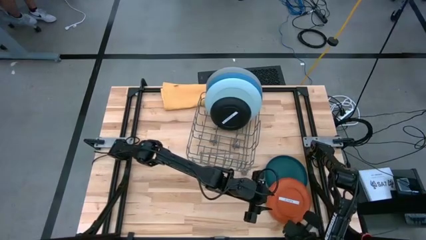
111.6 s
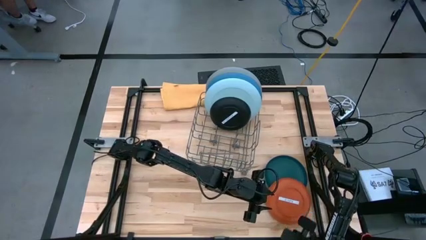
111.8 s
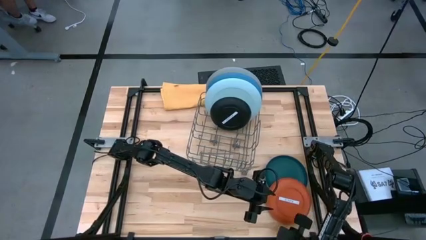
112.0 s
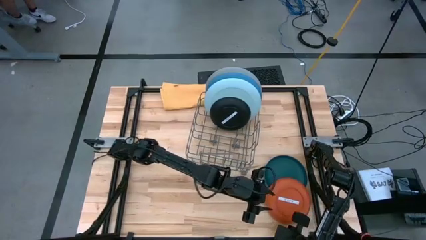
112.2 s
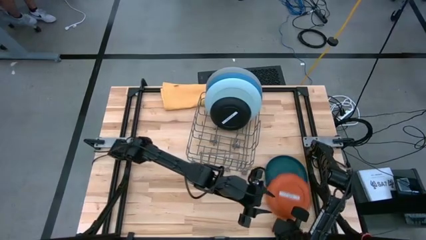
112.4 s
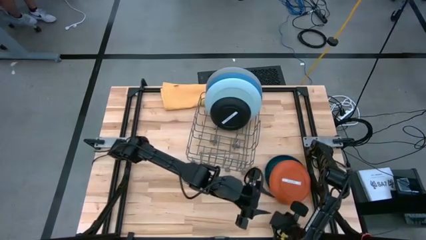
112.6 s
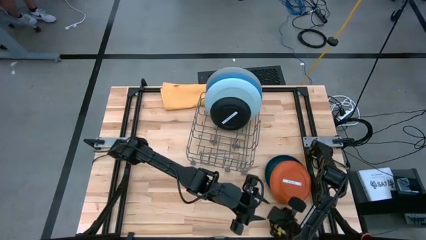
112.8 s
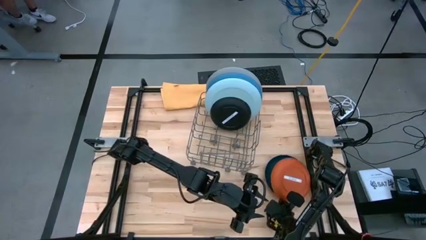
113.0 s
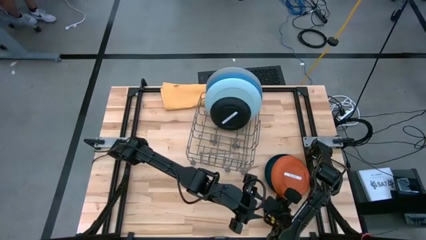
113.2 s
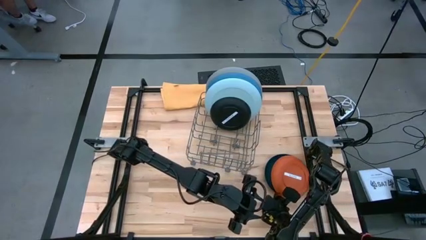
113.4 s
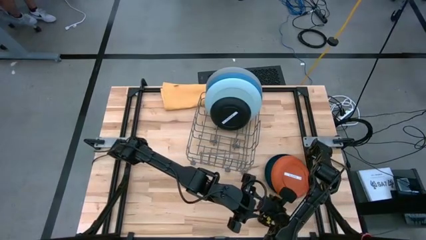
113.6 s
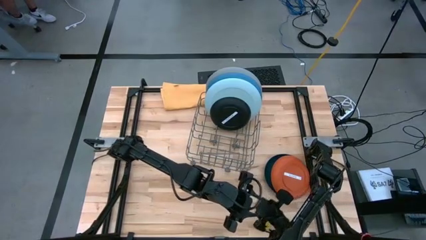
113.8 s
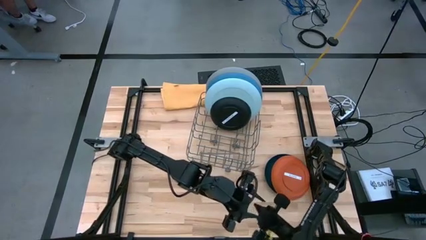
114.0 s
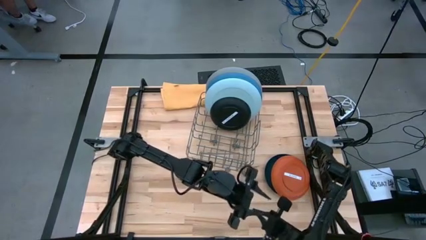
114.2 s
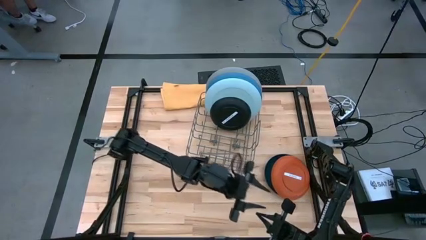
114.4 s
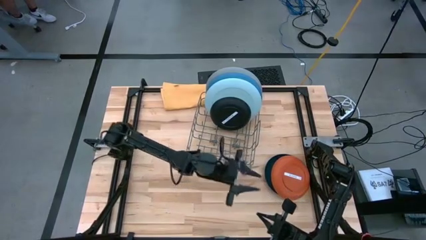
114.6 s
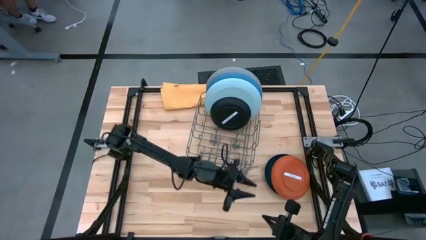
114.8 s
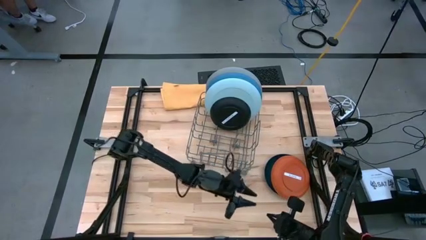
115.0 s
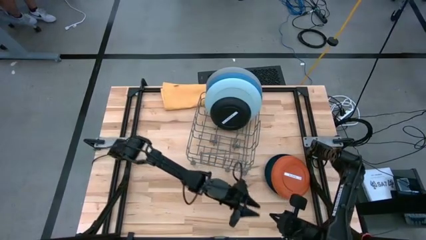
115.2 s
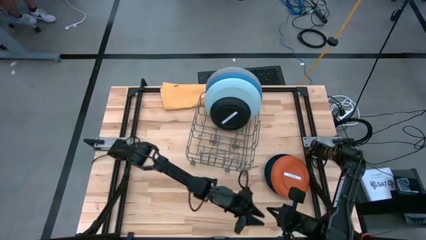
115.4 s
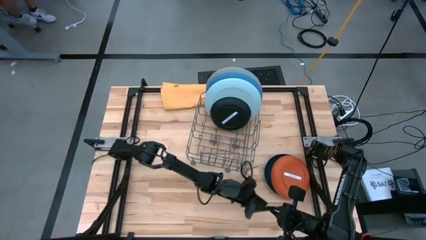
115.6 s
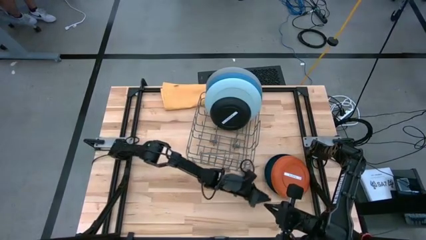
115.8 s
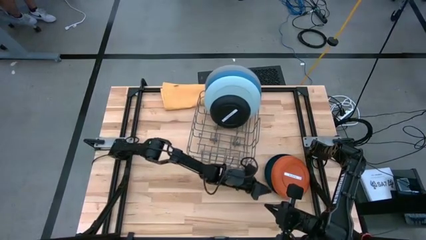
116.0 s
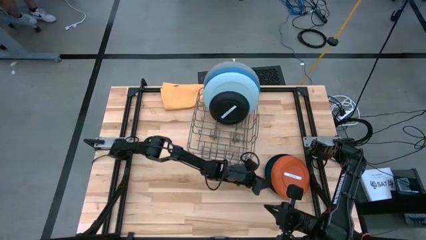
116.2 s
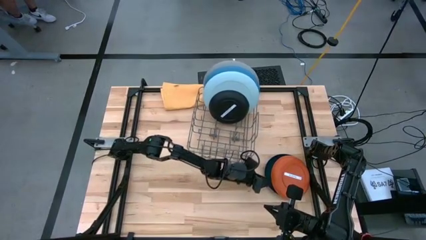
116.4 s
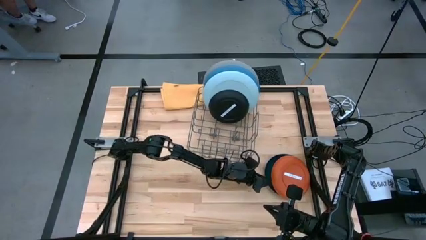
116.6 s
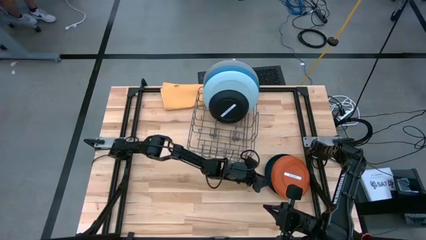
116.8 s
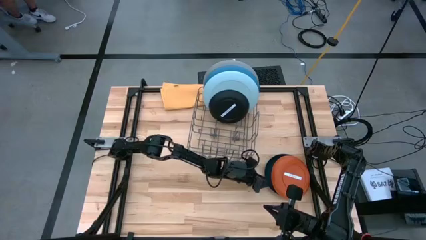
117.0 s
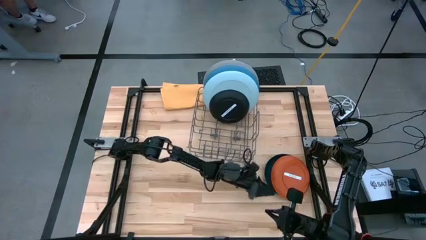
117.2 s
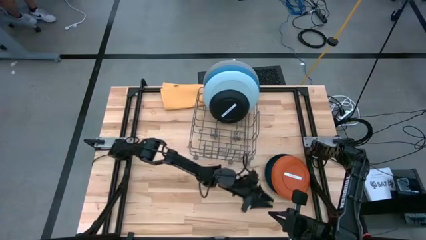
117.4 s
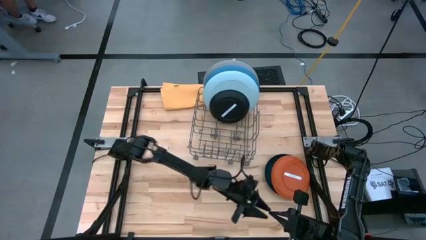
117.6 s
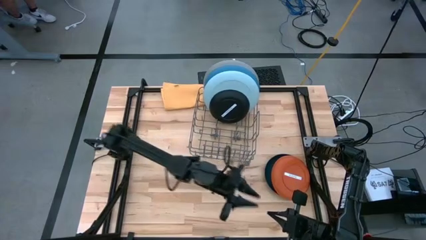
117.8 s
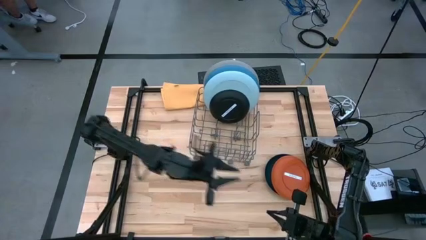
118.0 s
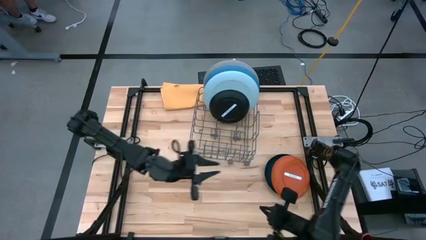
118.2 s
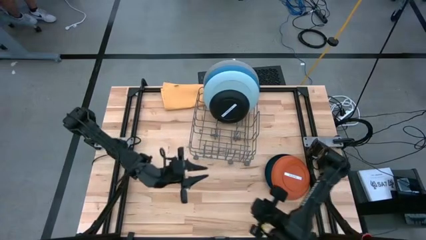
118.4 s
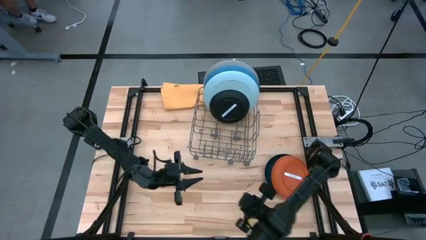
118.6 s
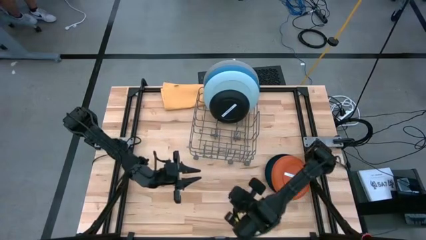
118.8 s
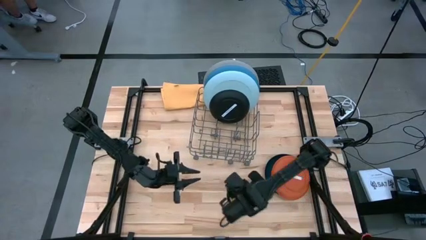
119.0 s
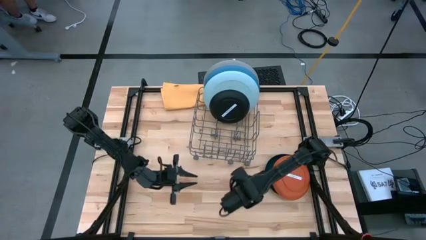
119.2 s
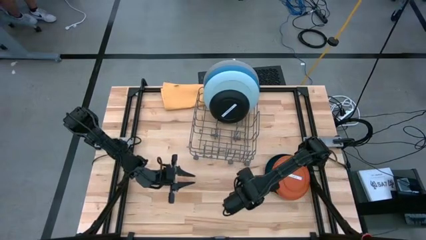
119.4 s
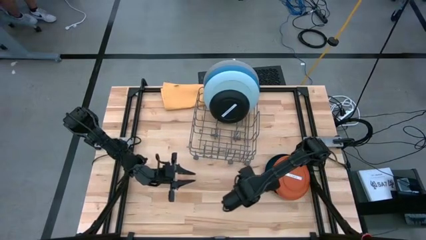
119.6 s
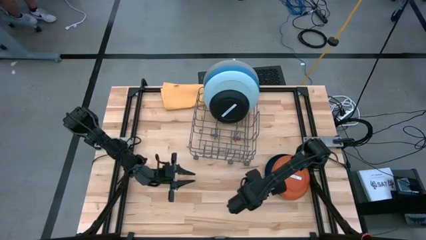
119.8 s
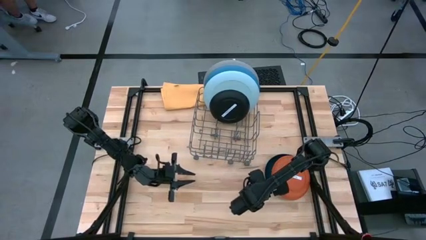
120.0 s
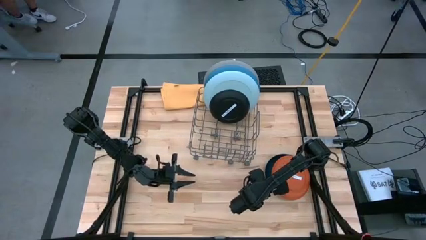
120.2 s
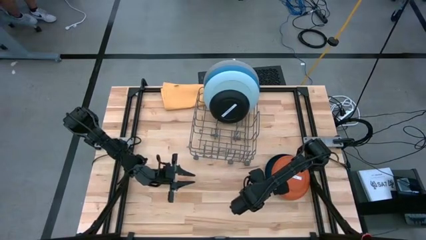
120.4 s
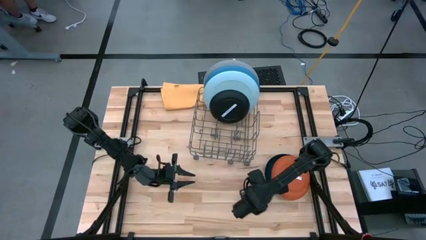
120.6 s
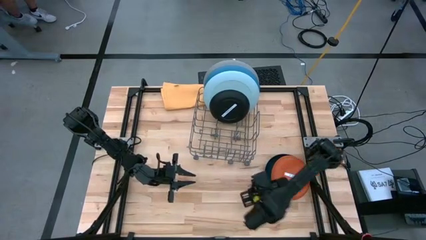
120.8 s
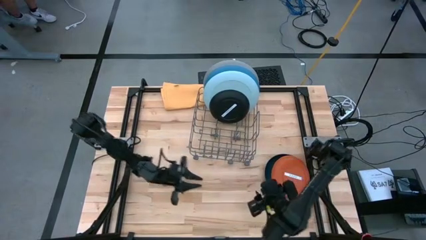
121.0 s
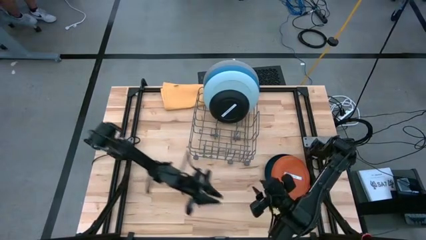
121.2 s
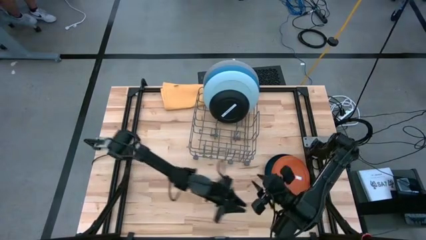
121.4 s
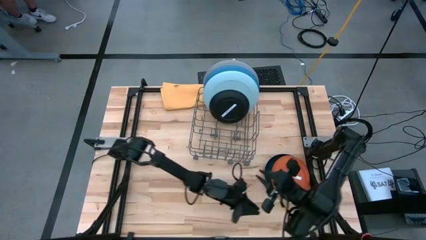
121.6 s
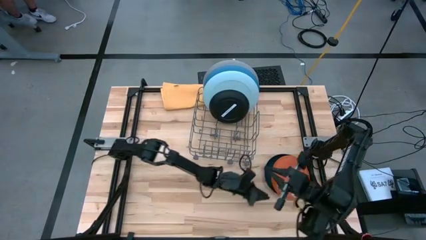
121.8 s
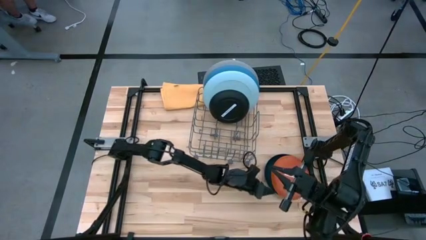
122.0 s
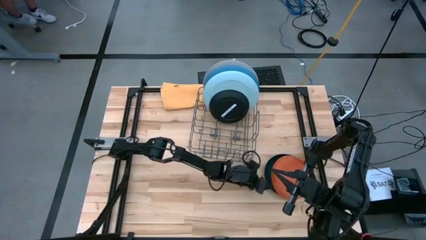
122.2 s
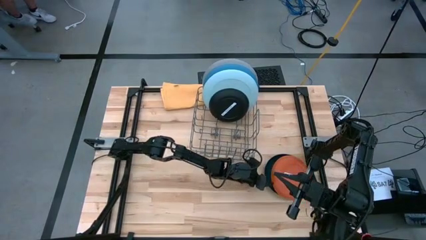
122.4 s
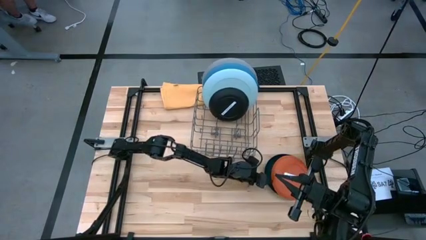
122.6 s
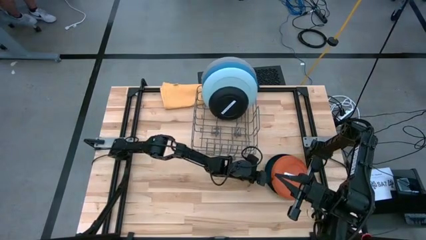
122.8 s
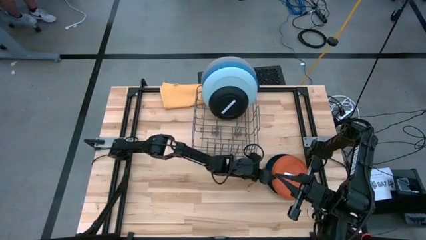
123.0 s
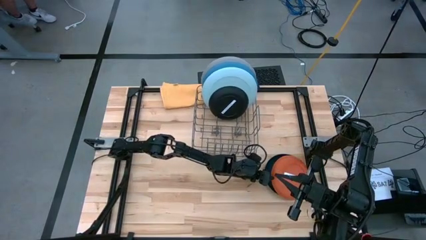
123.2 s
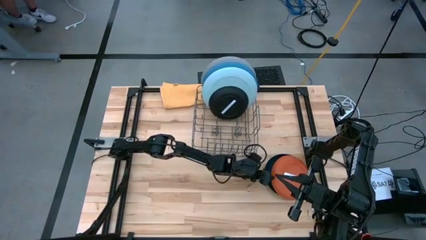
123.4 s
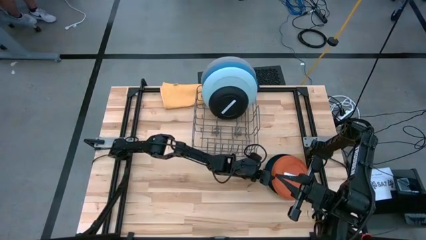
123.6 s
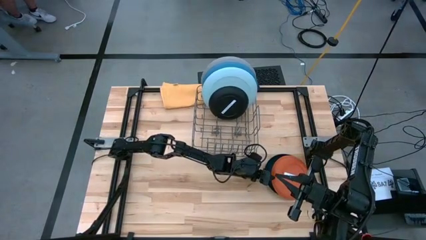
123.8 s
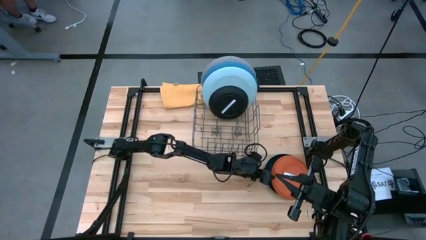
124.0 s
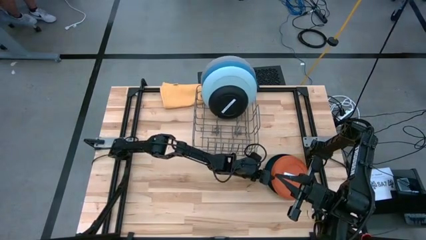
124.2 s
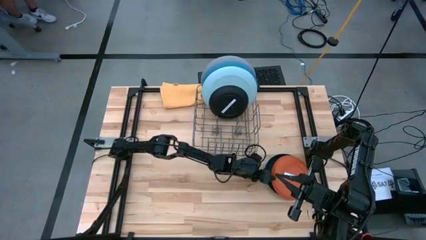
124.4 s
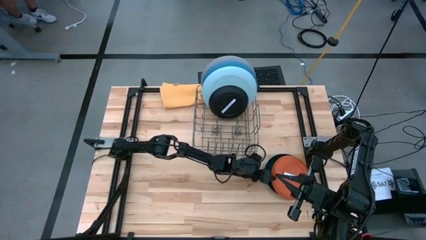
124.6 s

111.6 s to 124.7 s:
Task: Sort dishes
Put the orange plate into the dish rack

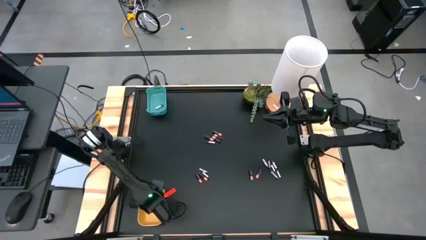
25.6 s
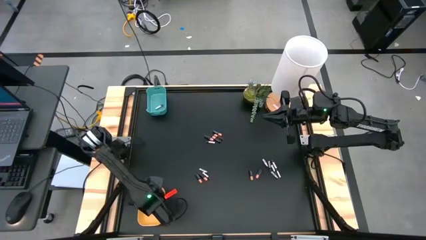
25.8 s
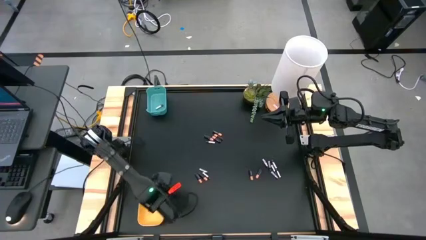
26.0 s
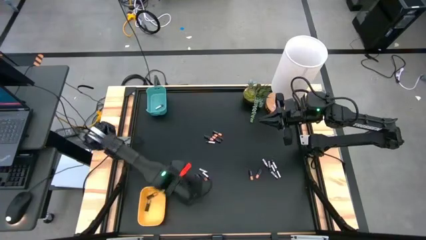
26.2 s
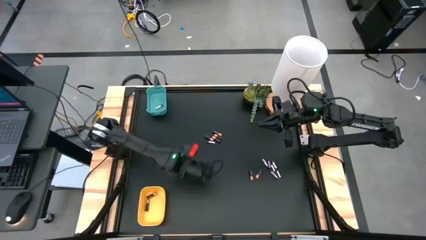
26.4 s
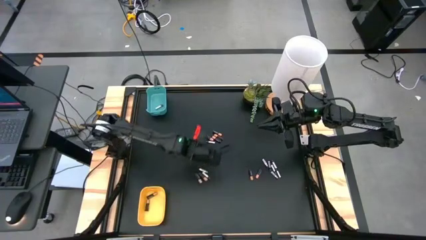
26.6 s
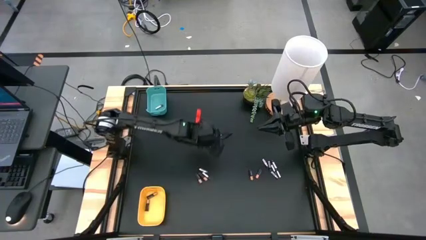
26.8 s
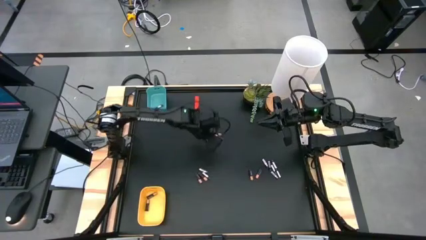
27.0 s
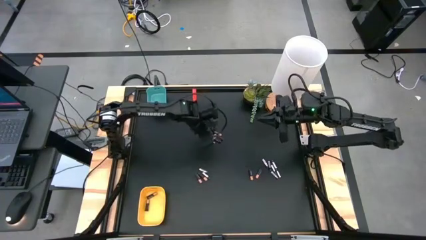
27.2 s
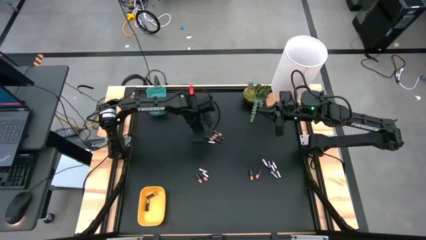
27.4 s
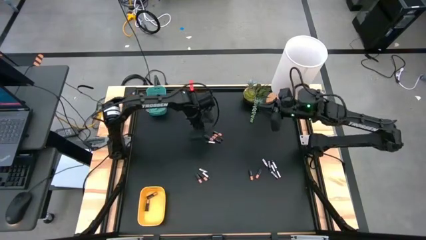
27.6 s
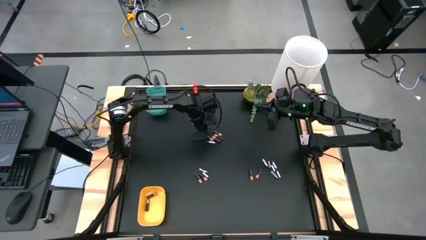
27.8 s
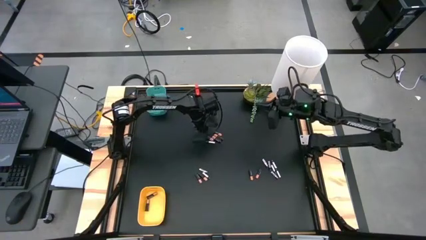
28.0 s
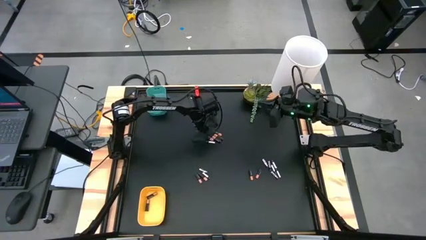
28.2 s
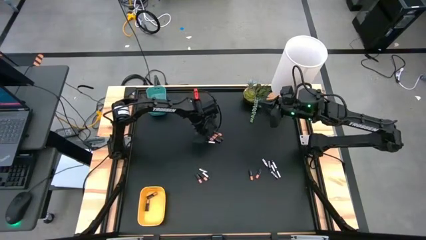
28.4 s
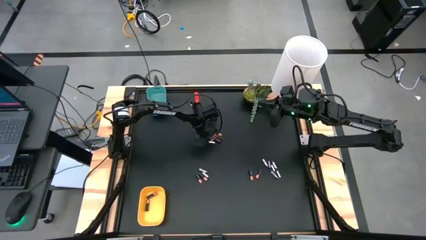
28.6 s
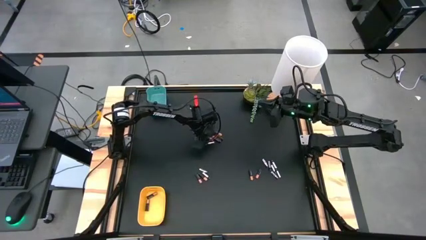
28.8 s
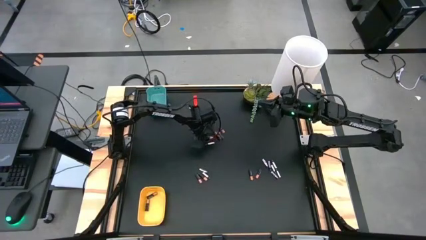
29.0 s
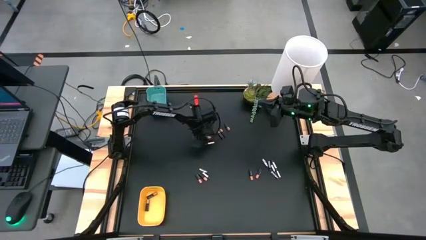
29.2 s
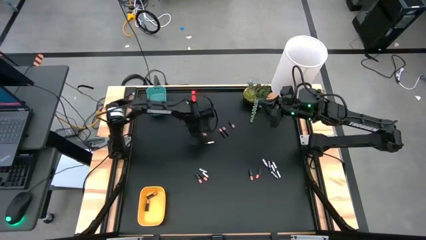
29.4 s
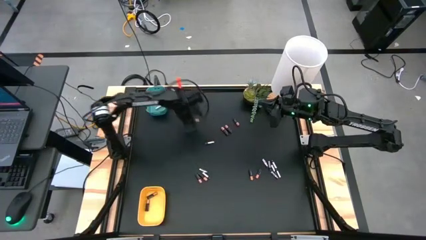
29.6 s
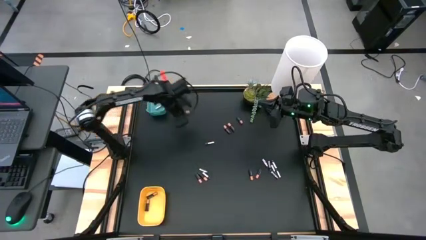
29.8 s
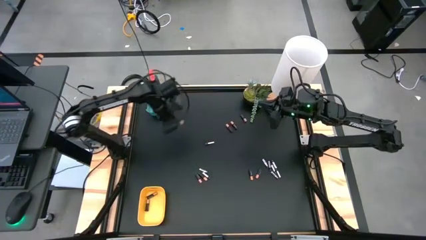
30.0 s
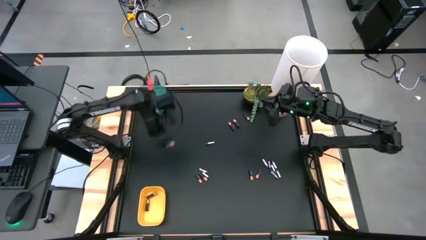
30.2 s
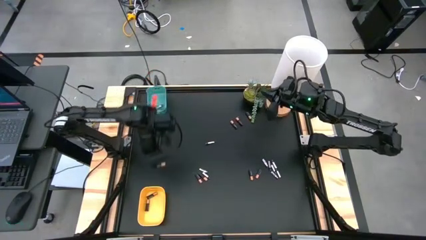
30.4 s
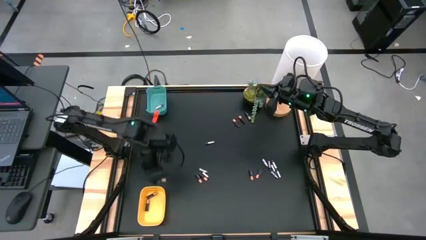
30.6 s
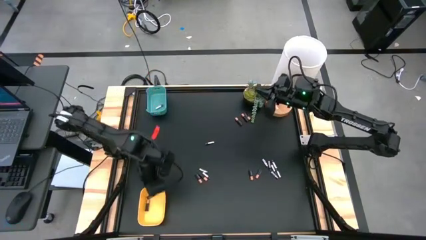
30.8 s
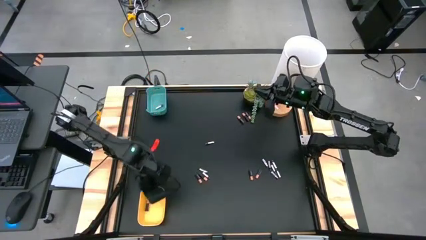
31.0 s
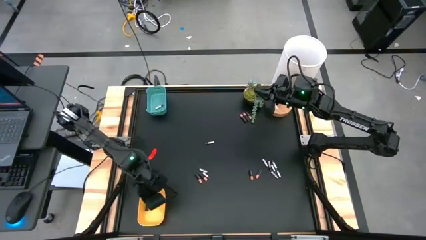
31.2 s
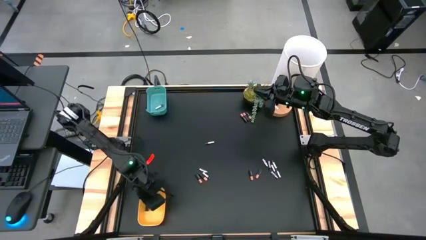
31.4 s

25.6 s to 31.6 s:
Task: Sort batteries
Put the black battery into the yellow bin
